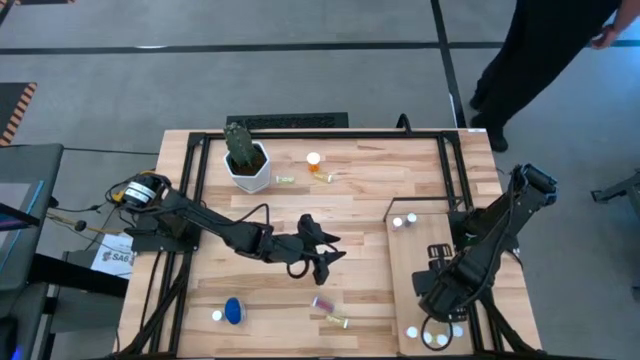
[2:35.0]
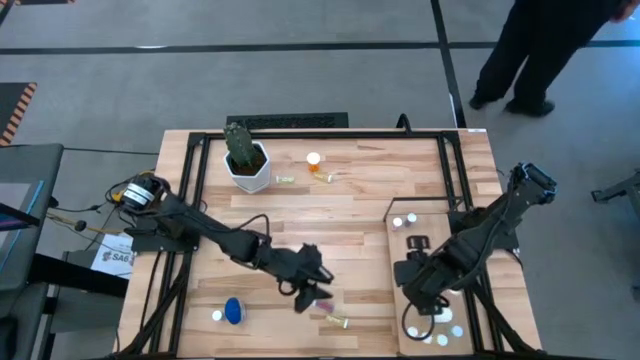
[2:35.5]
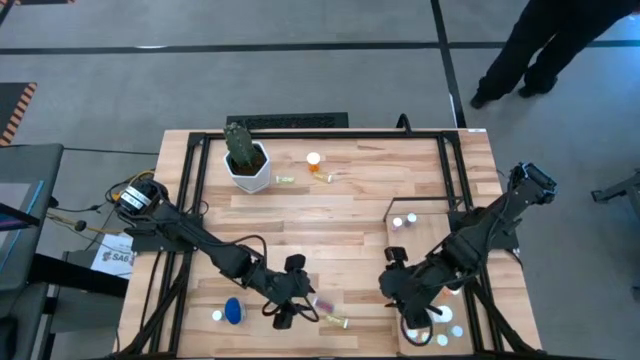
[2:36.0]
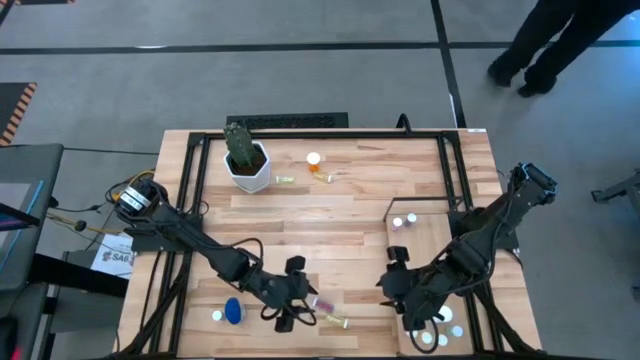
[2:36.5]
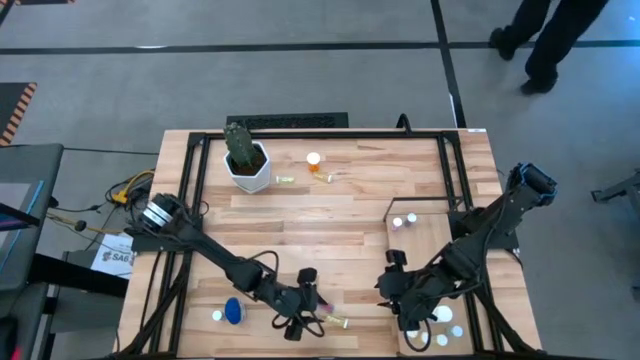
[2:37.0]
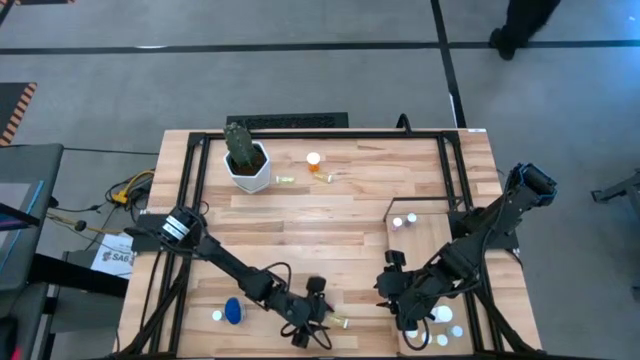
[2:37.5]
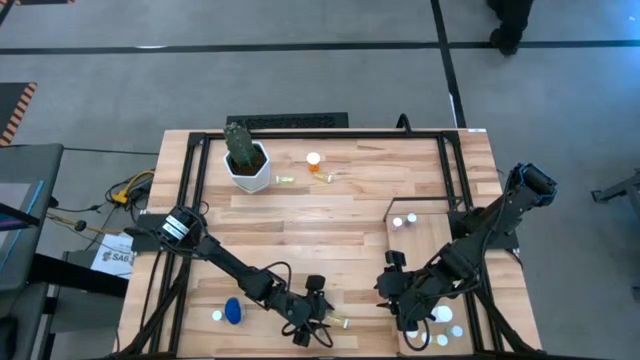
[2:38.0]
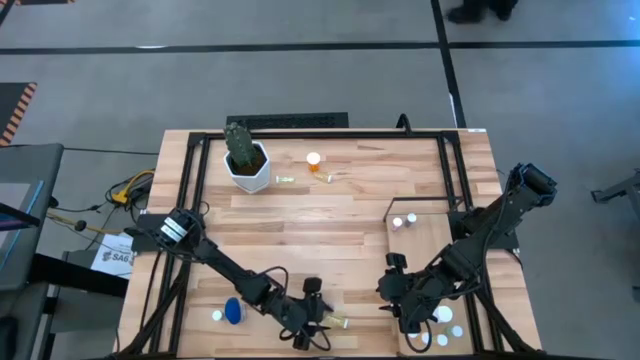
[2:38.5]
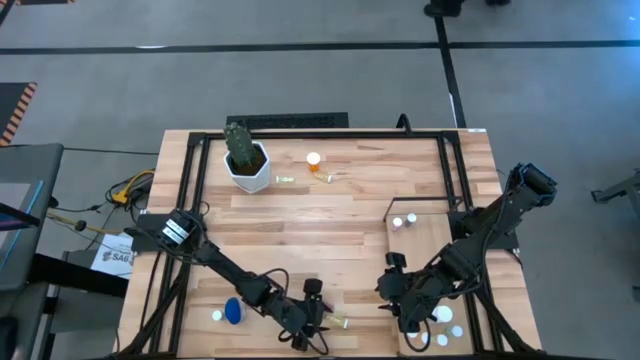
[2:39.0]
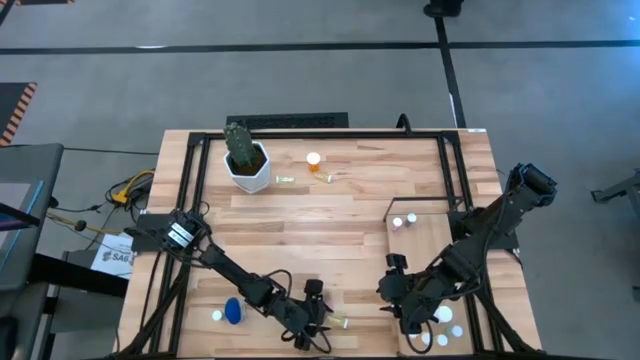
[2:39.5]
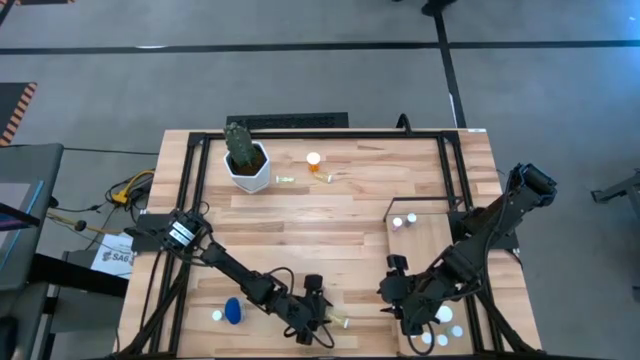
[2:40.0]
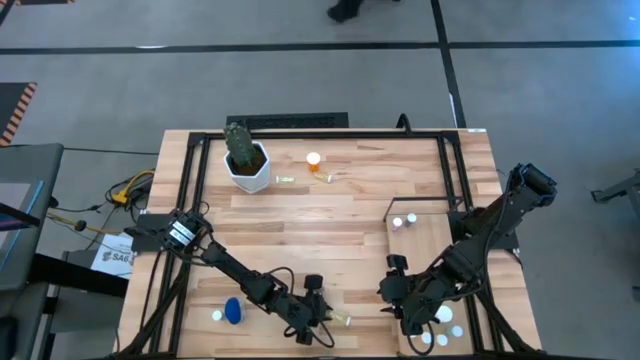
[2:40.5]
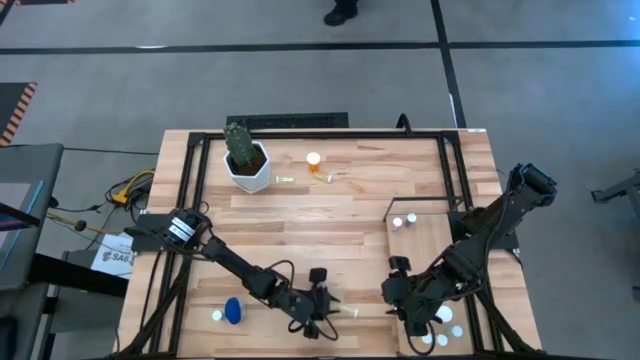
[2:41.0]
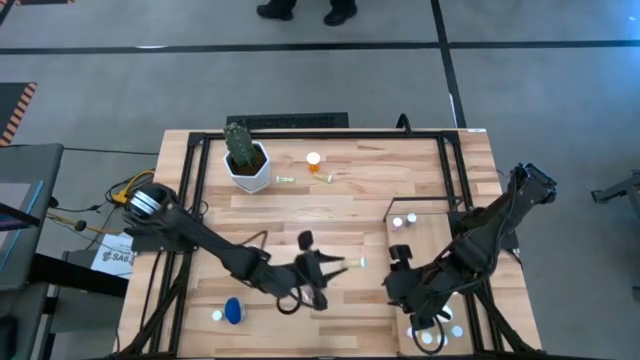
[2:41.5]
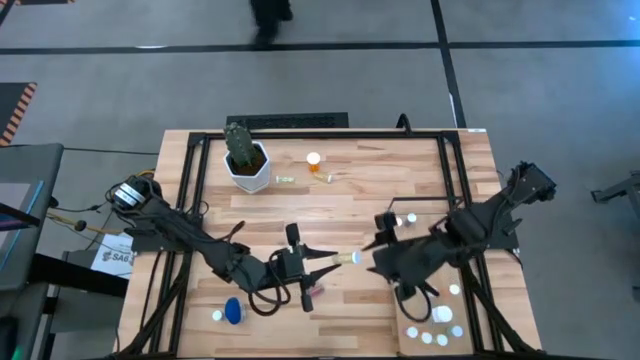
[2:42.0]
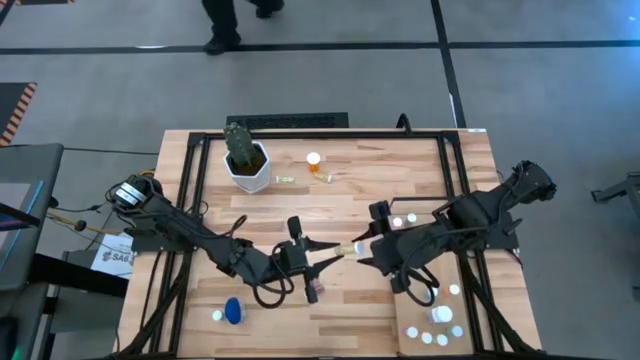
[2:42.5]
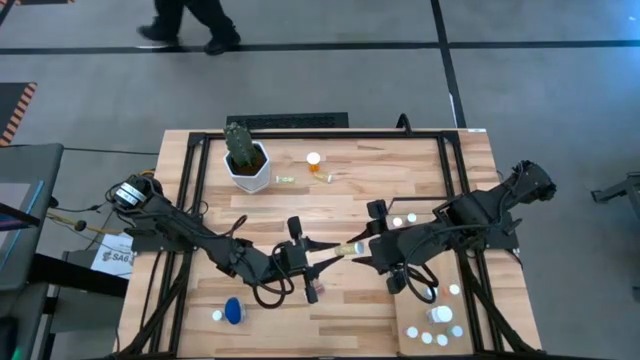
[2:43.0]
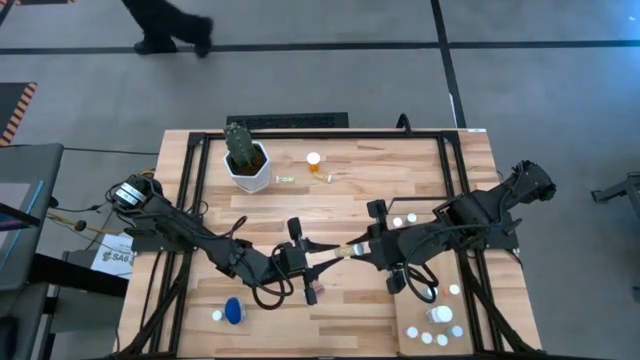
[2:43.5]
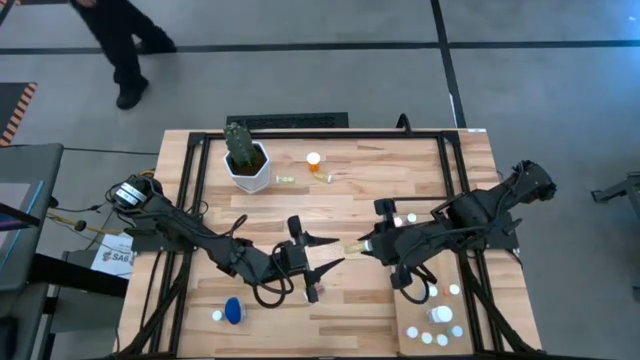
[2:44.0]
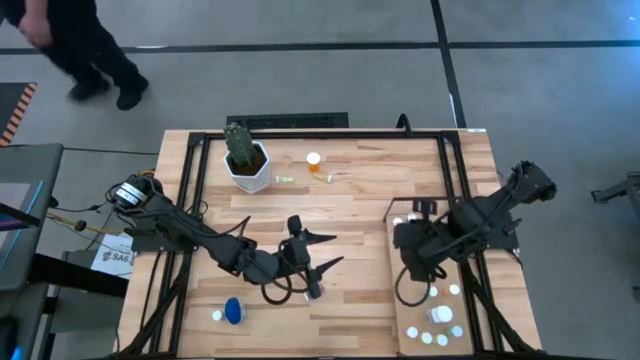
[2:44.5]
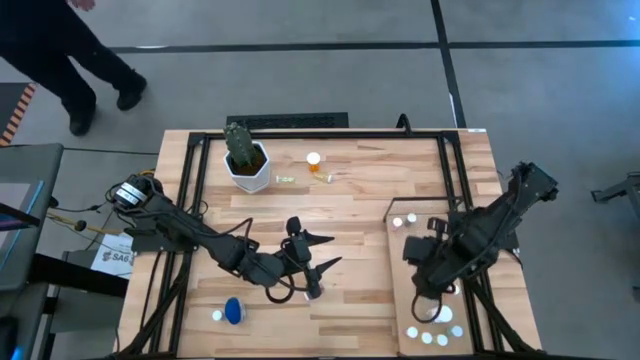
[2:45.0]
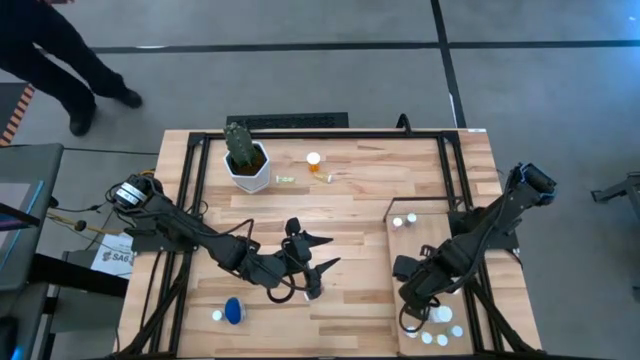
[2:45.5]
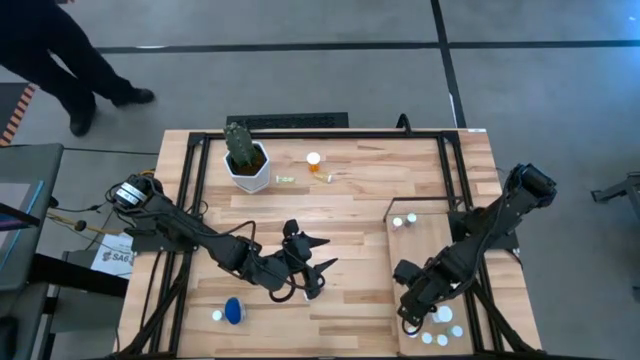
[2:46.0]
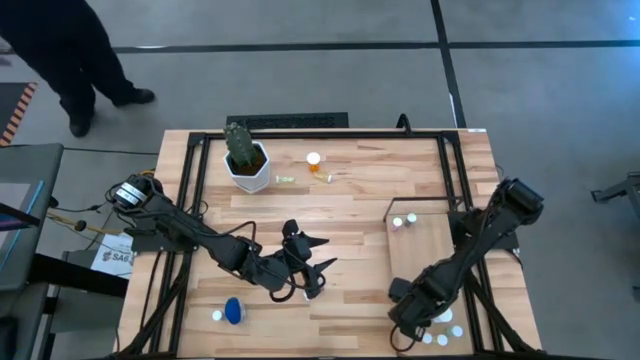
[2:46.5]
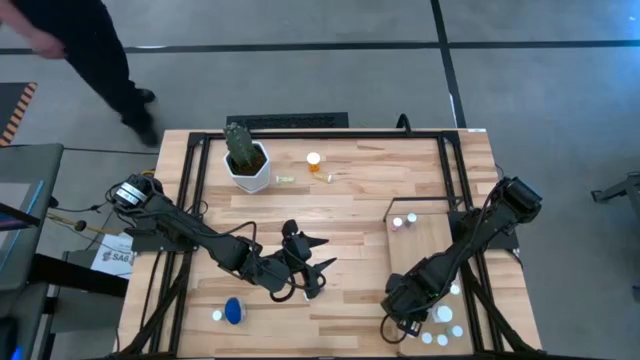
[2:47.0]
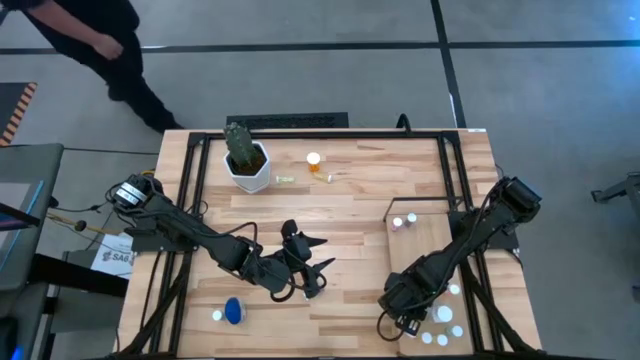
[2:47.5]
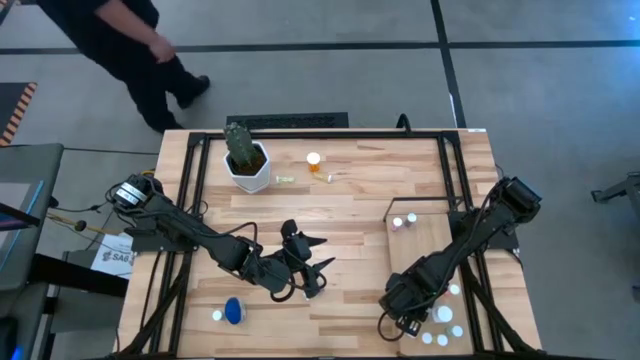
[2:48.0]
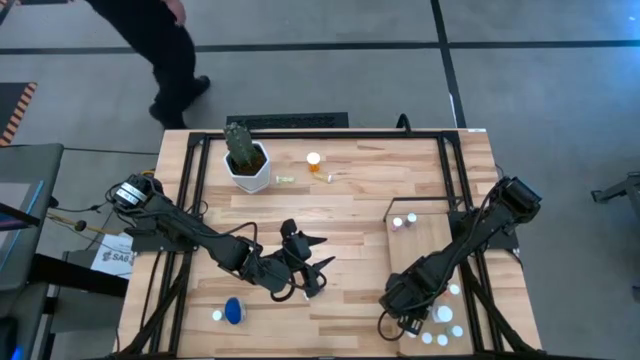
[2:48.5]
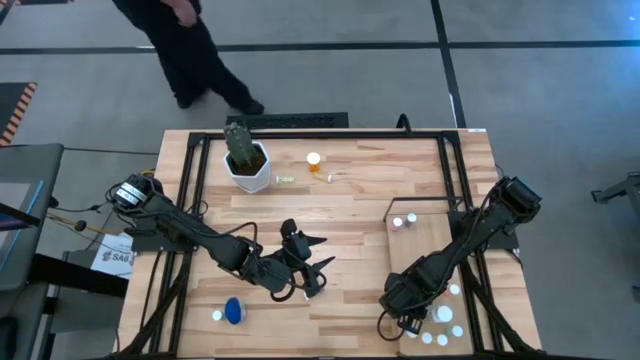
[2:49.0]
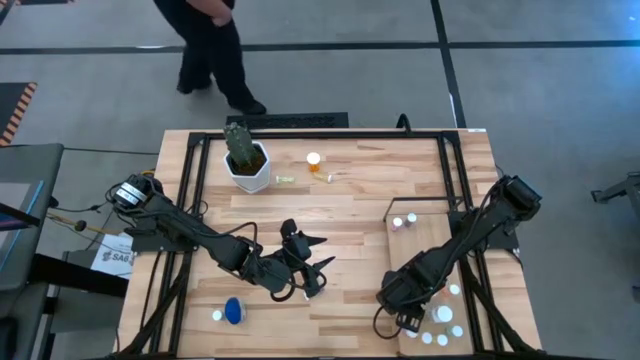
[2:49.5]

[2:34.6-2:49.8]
Task: Pick and place medicine bottles onto shelf by color
Put the yellow pill bottle on the shelf

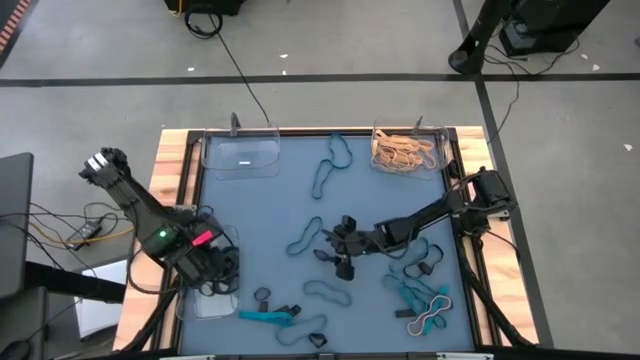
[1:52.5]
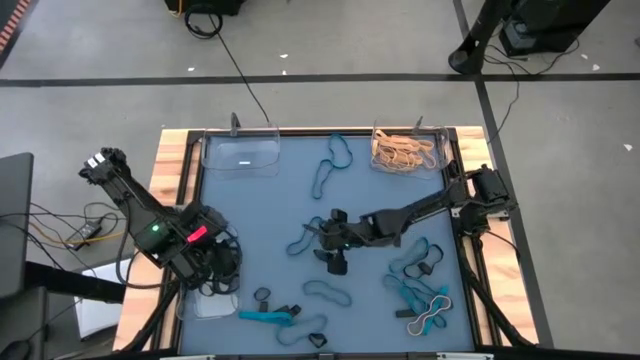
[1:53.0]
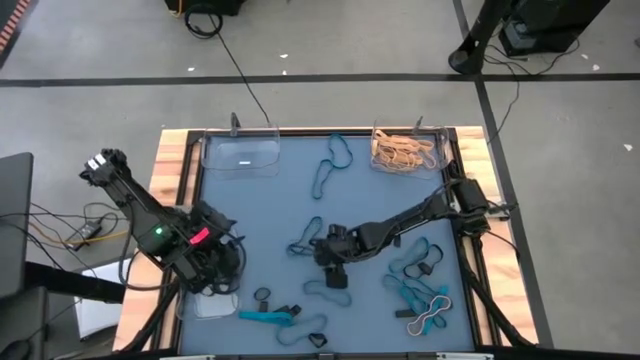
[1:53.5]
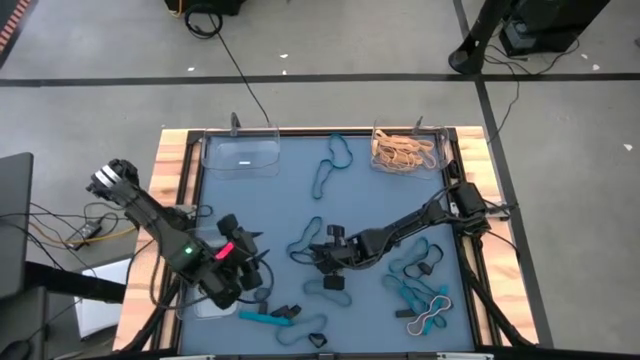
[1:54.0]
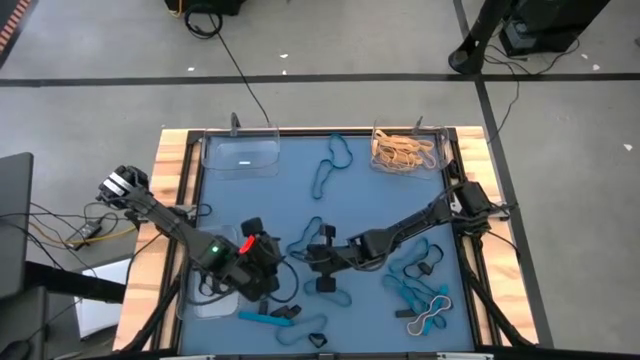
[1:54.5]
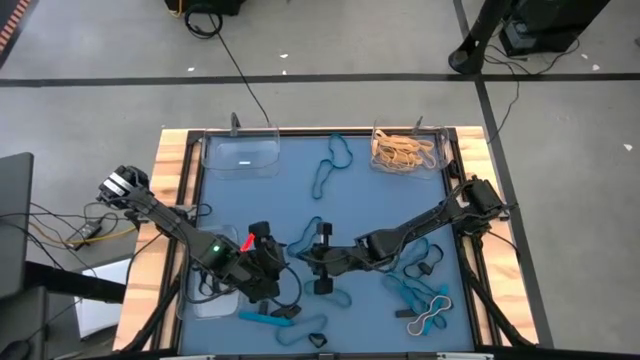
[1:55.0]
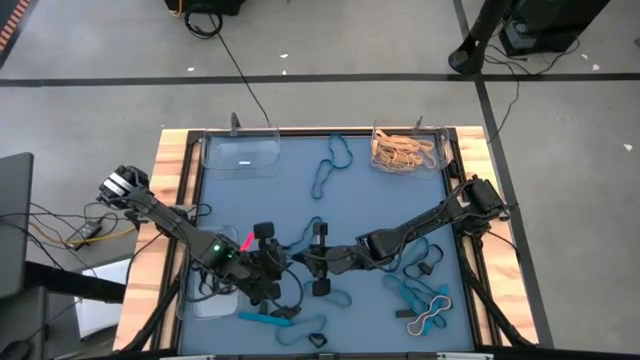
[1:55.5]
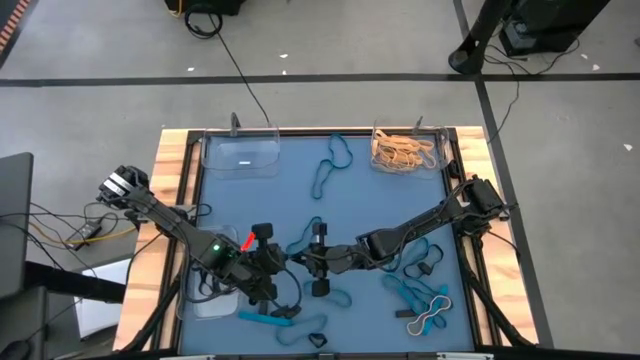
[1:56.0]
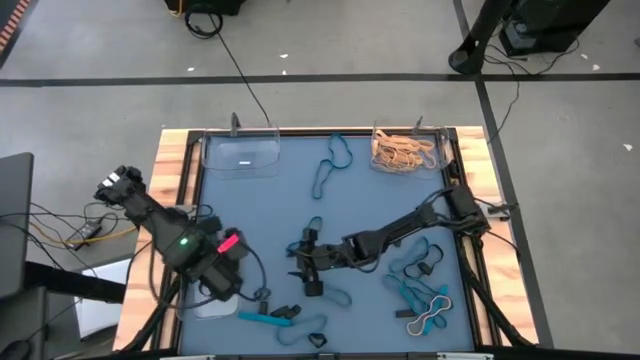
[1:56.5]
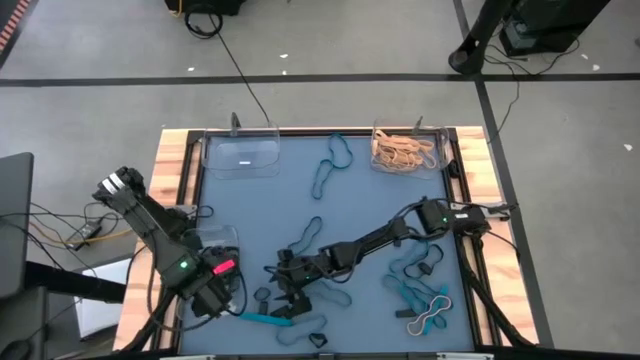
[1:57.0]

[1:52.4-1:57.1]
Task: Sort rubber bands into baskets
Put the small black rubber band into the bottom left transparent bin

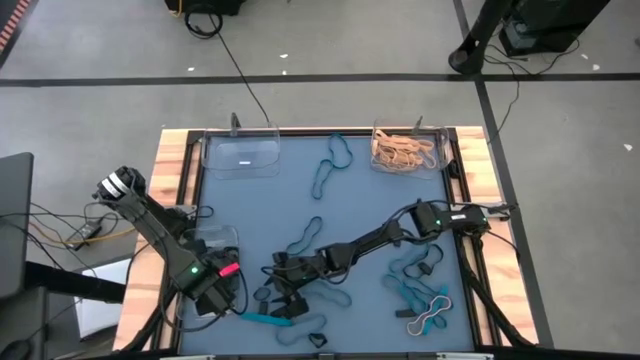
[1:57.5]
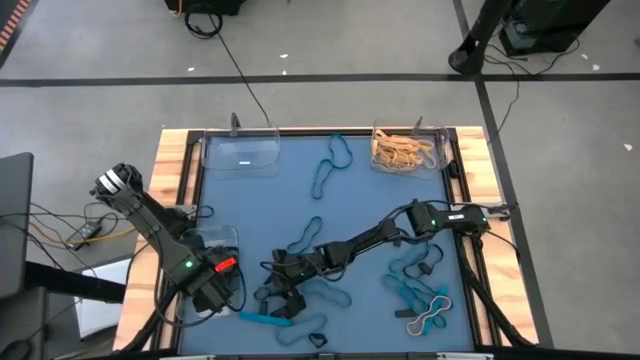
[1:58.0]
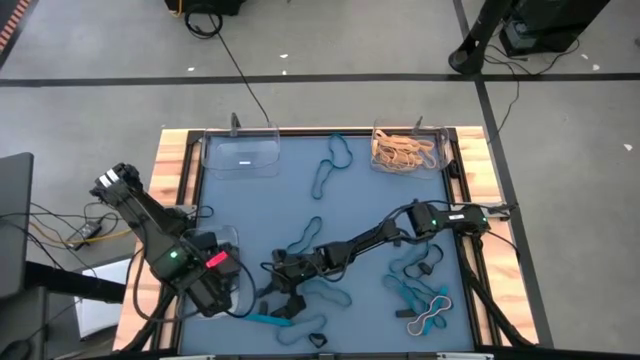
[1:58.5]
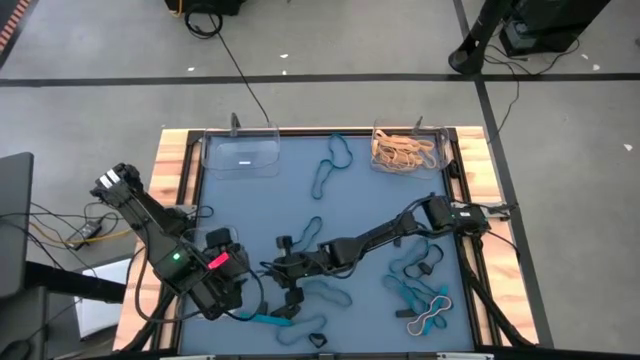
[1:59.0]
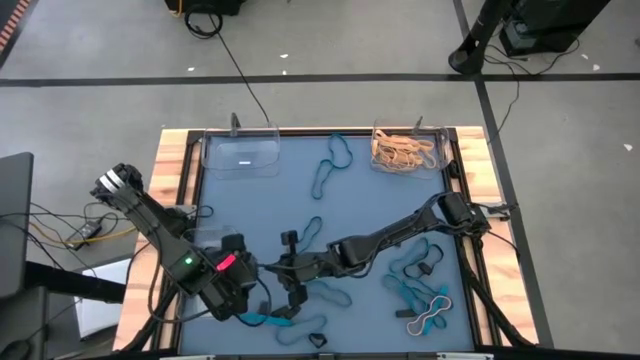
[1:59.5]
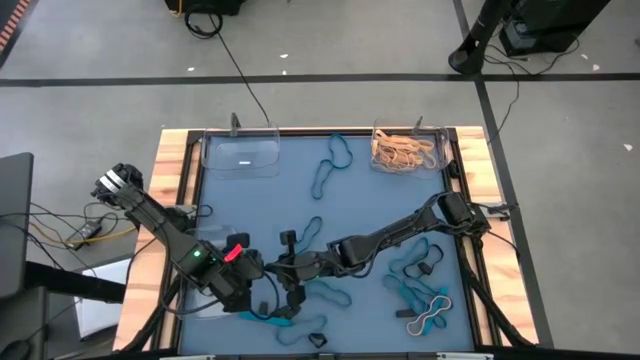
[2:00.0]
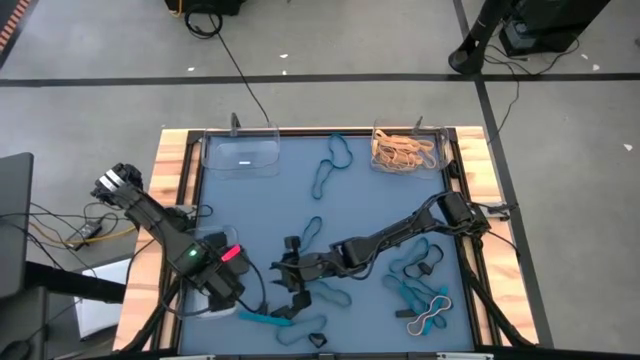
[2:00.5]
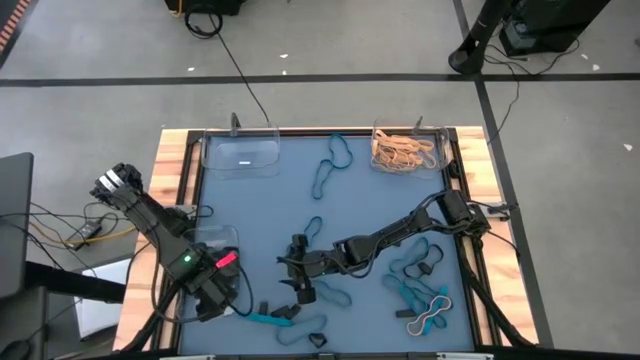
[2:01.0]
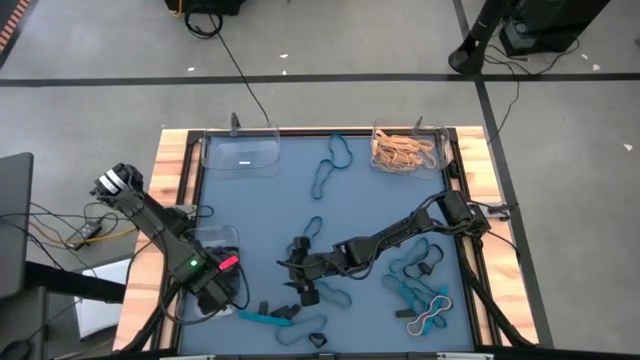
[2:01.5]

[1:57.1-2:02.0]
Put the small black rubber band into the bottom left transparent bin
